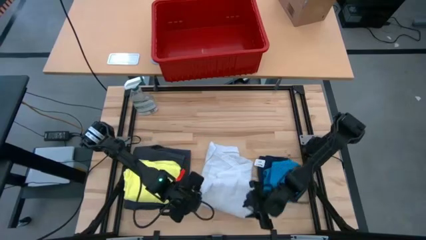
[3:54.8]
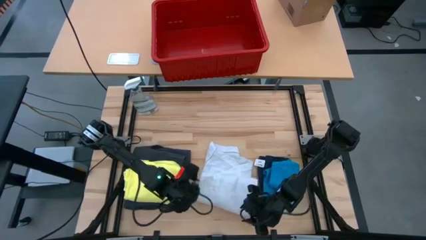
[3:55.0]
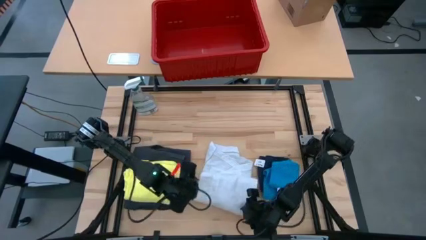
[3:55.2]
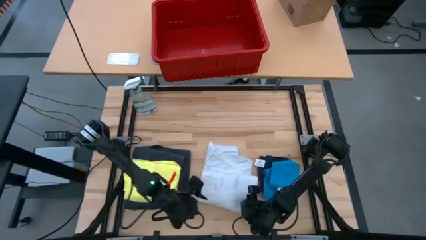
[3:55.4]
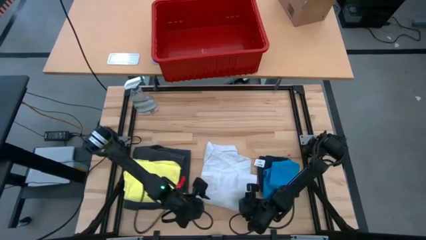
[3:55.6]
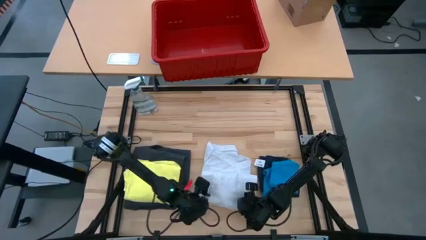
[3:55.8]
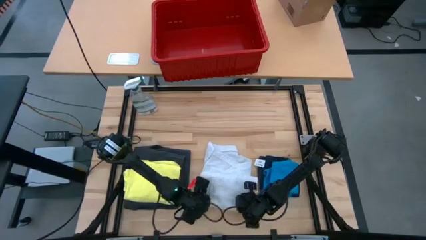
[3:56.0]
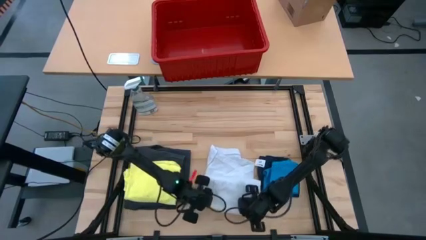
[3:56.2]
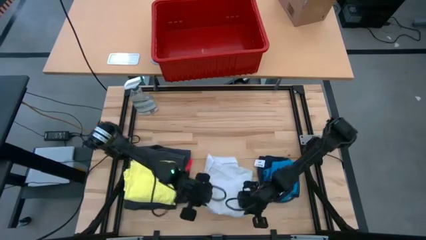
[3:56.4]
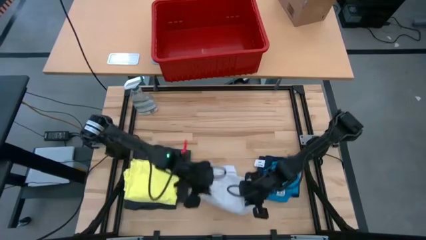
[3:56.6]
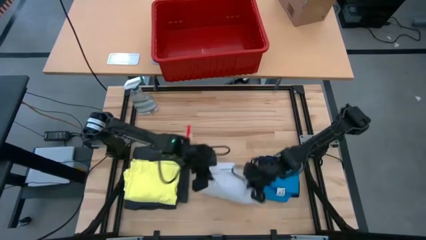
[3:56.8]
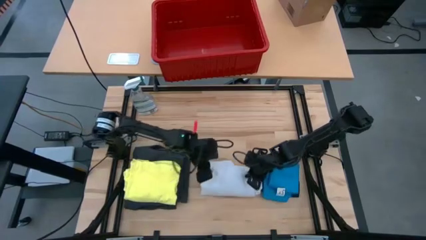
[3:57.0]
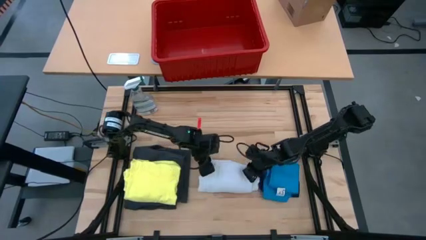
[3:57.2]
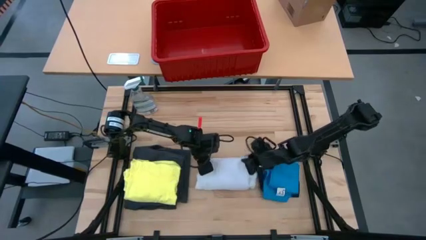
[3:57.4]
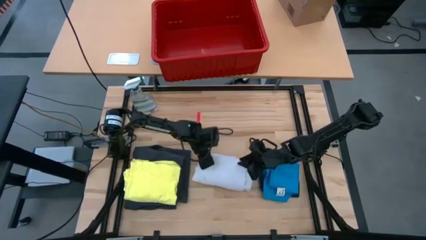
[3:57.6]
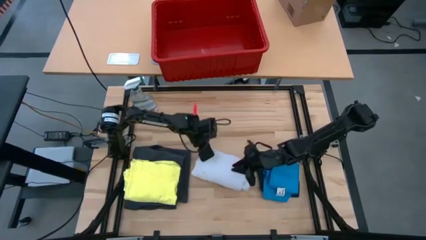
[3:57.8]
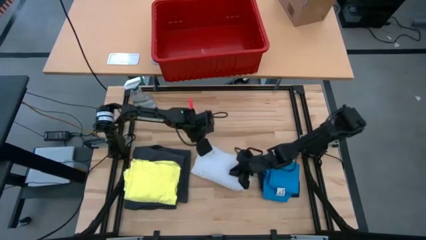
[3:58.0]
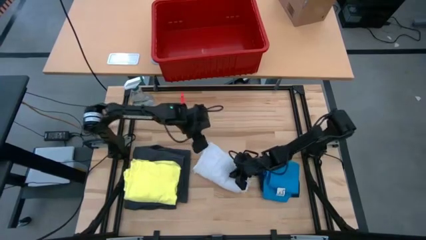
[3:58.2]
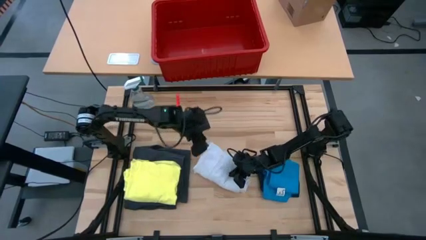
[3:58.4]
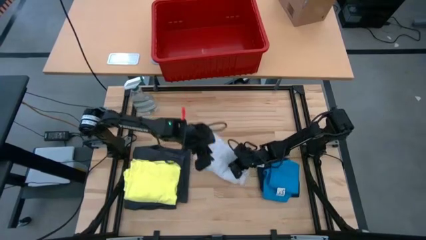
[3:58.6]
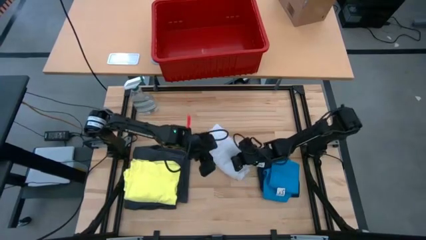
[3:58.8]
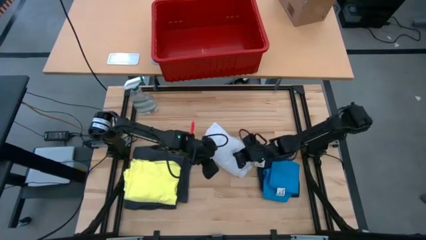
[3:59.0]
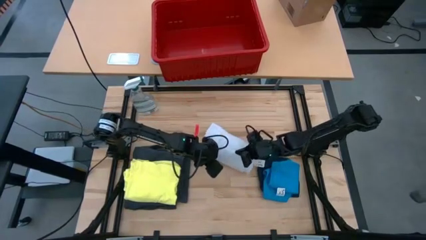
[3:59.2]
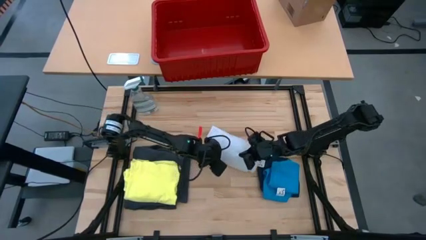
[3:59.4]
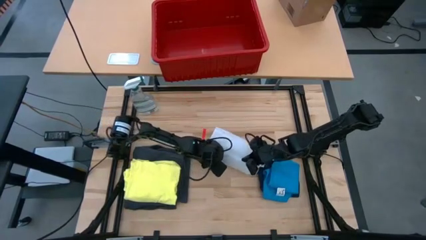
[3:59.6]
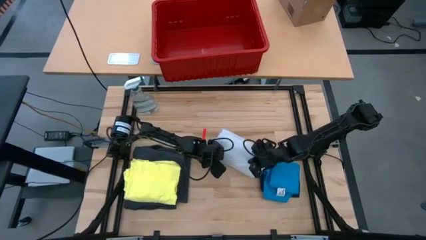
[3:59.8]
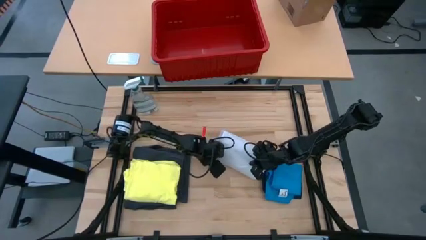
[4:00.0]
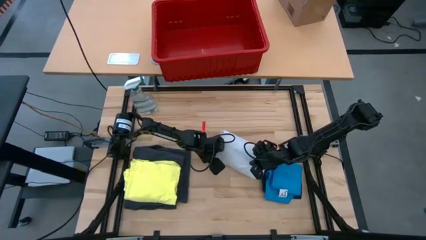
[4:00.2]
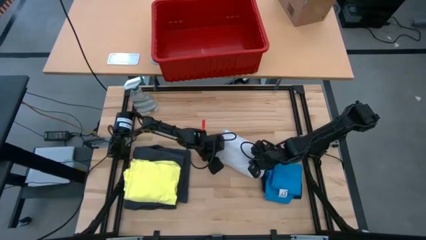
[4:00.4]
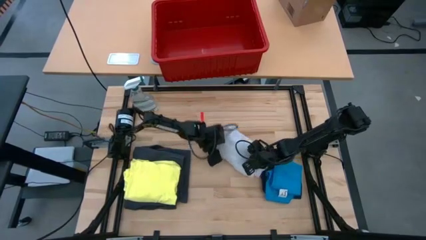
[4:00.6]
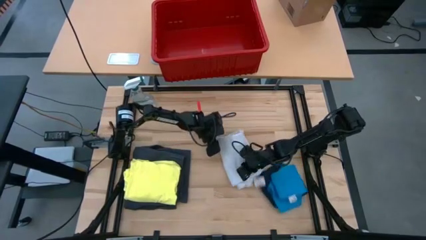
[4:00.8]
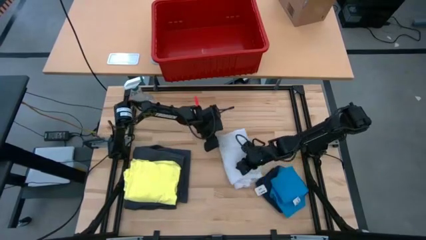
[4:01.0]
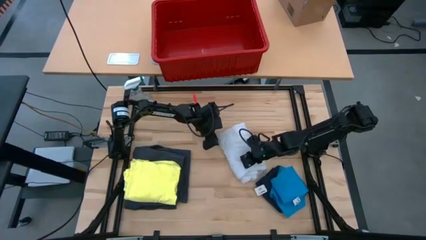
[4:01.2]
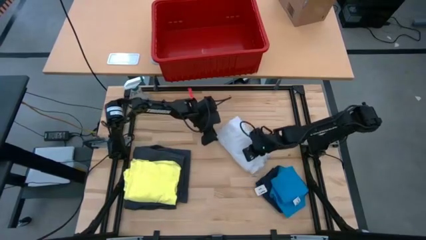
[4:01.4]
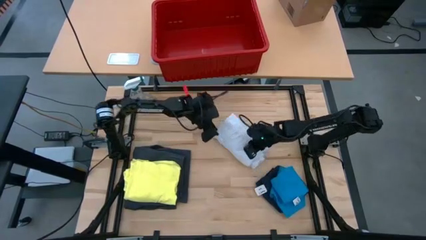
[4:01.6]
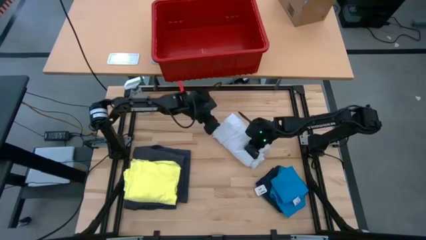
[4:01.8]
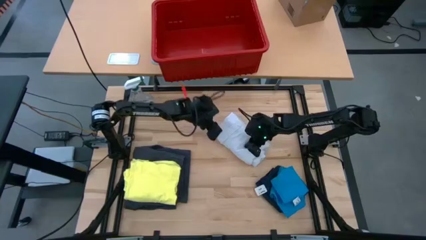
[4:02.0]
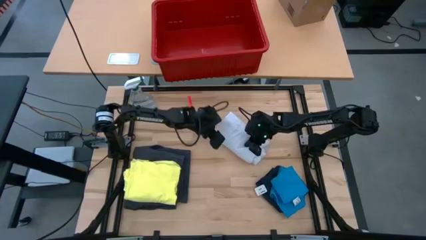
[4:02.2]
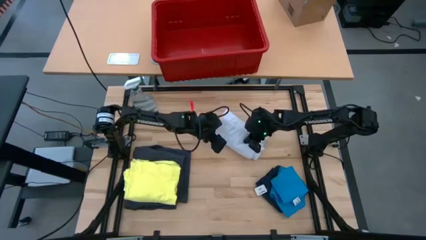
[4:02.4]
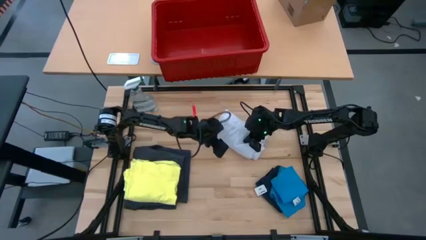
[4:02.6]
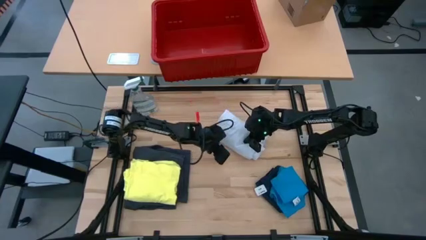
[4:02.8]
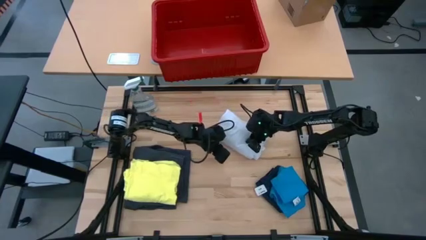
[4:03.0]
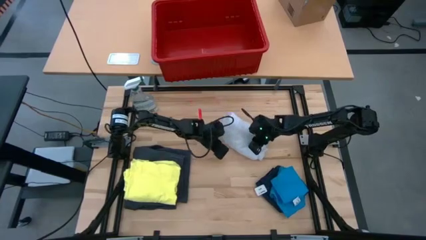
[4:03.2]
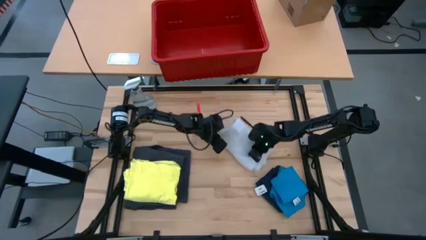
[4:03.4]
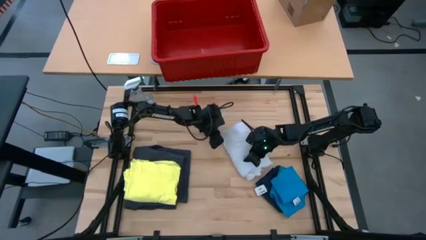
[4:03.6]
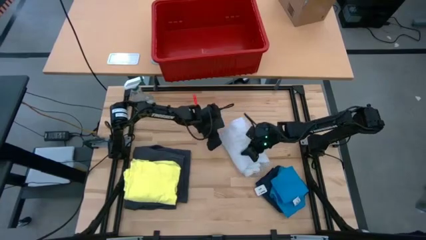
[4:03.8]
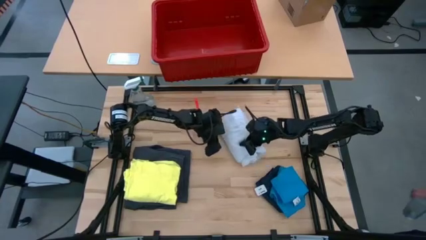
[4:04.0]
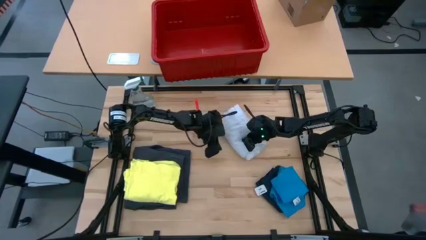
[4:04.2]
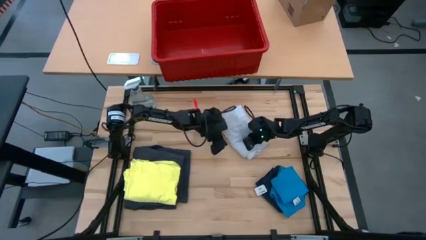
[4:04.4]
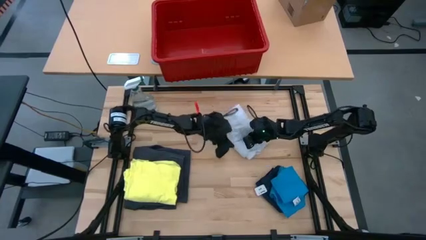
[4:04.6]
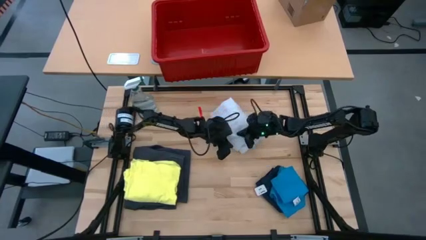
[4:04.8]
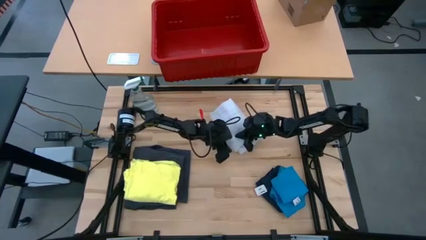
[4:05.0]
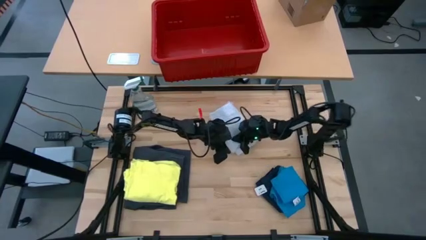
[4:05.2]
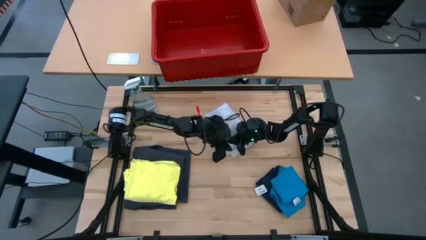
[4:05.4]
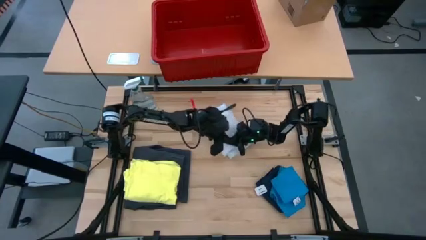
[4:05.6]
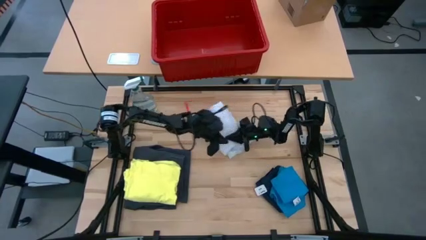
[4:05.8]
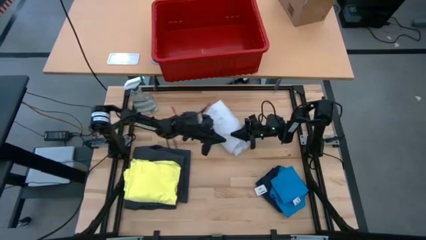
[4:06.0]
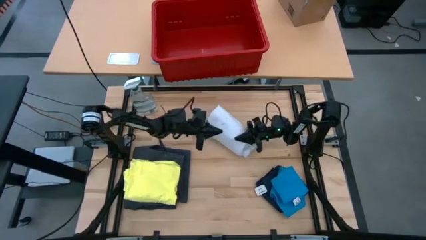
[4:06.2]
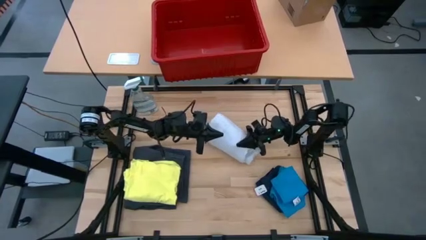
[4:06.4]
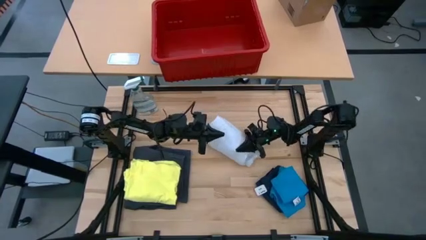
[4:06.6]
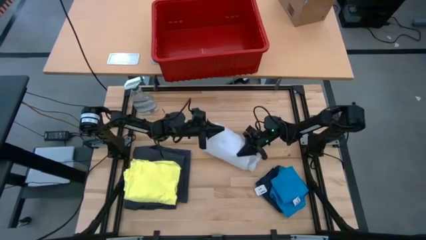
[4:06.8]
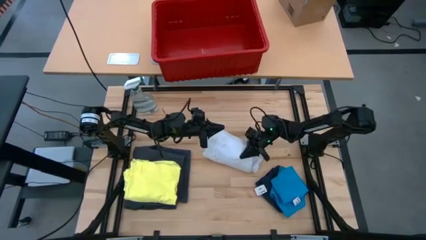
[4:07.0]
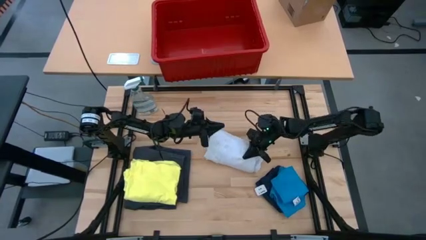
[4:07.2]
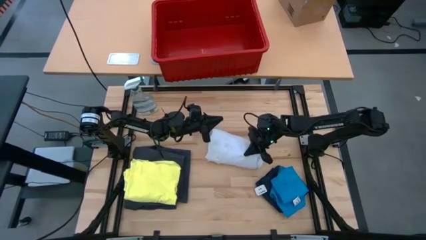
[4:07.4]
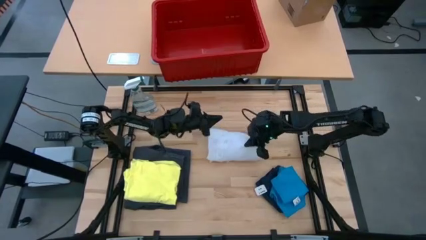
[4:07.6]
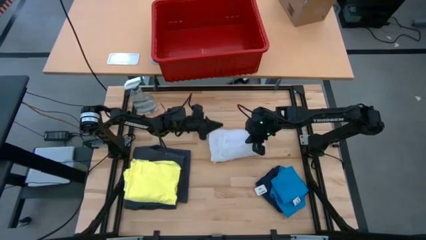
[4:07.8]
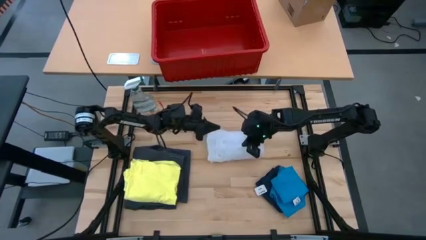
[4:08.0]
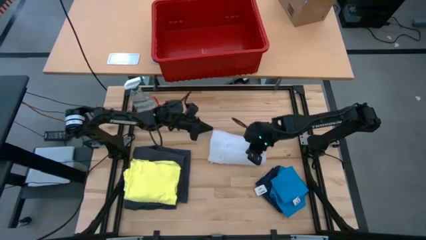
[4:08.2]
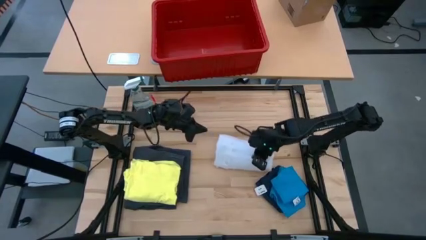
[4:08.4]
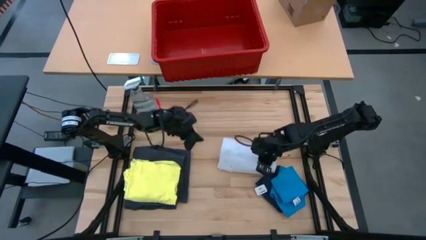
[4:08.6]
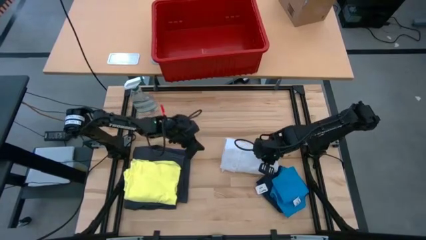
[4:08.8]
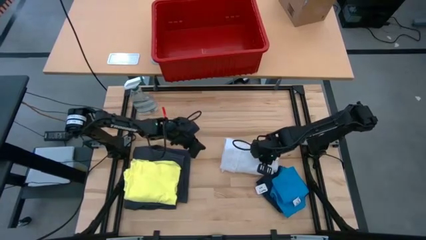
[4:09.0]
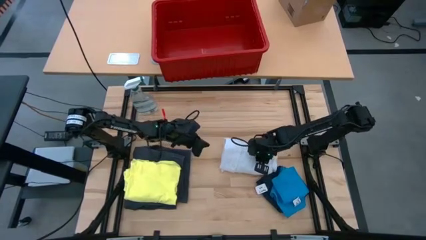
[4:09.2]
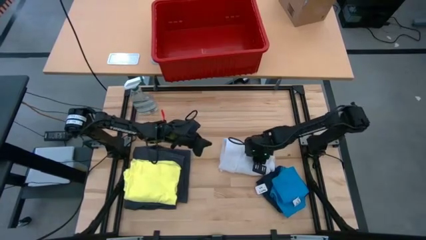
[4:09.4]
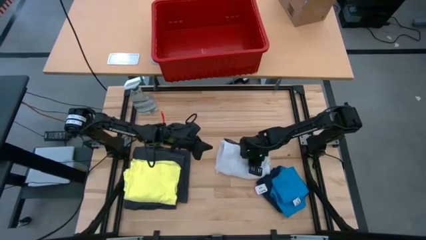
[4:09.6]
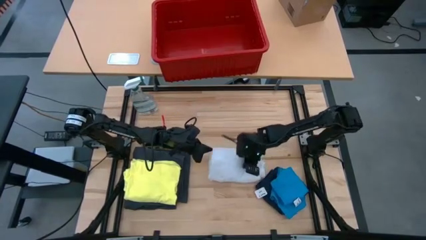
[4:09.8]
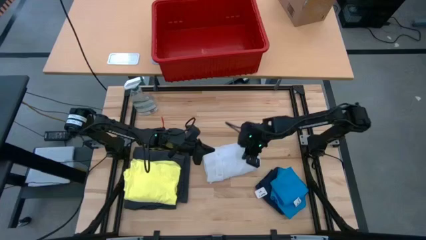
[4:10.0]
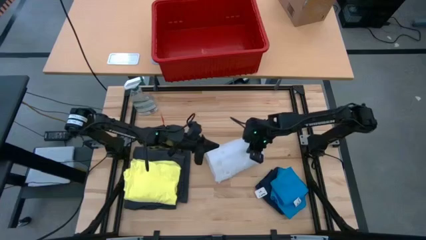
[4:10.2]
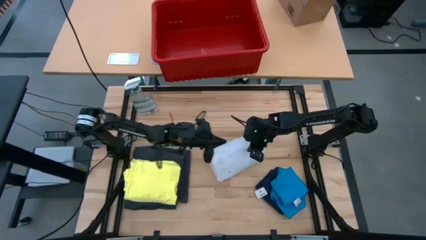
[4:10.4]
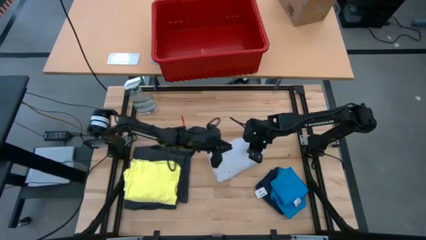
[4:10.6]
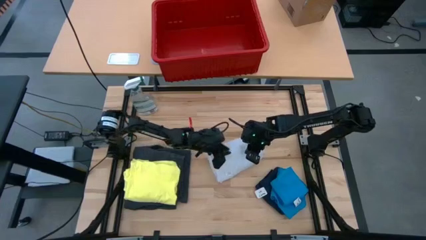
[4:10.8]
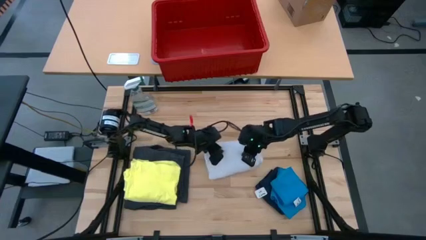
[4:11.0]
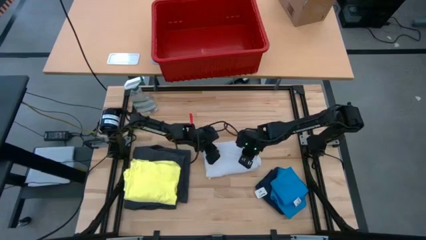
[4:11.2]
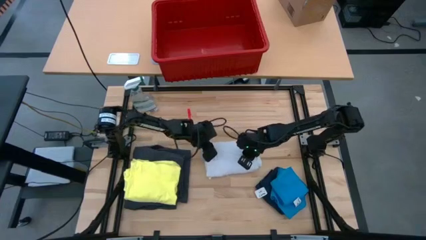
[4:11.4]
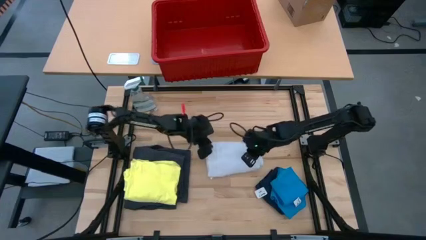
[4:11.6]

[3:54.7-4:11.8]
Task: Fold Laundry from Bin
Fold the white shirt
